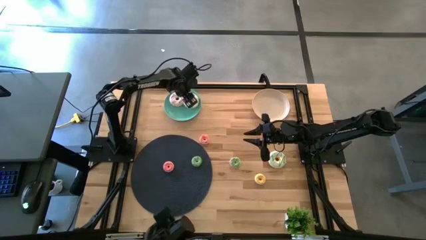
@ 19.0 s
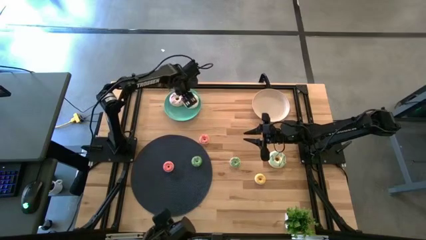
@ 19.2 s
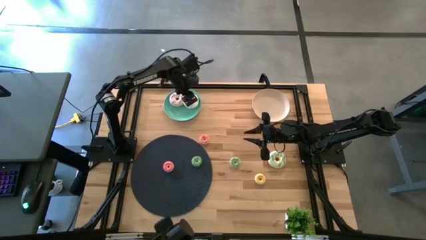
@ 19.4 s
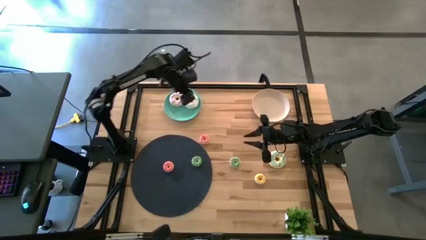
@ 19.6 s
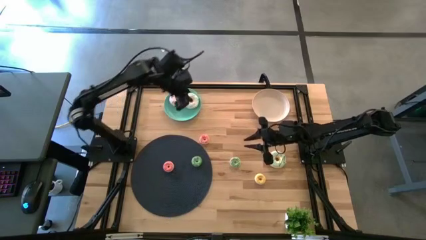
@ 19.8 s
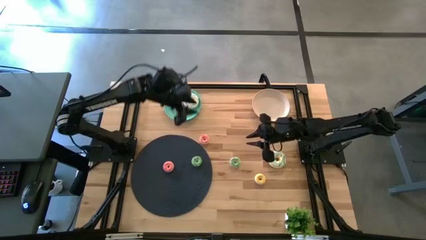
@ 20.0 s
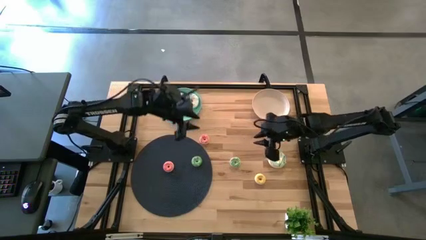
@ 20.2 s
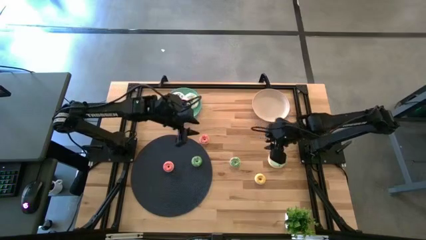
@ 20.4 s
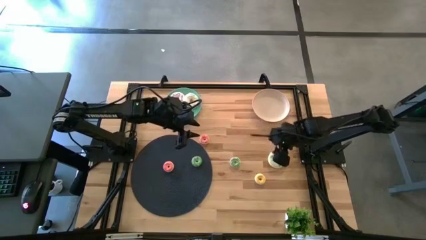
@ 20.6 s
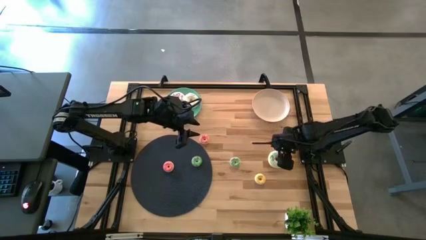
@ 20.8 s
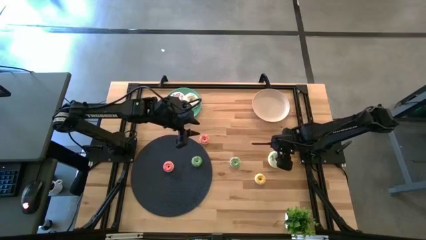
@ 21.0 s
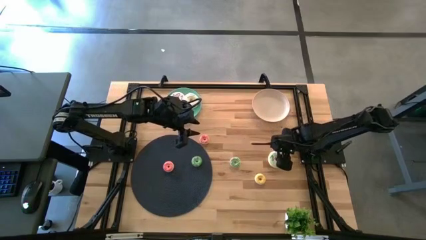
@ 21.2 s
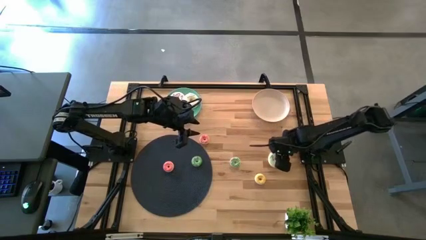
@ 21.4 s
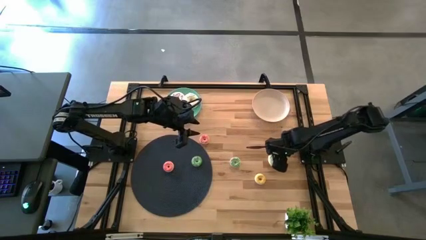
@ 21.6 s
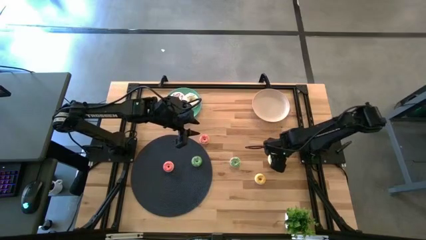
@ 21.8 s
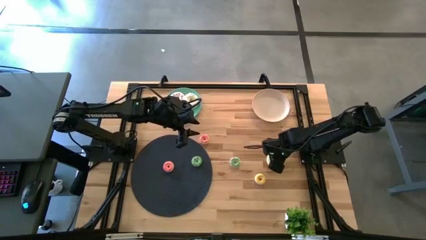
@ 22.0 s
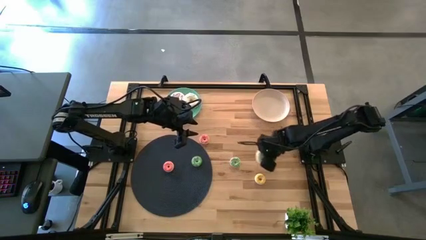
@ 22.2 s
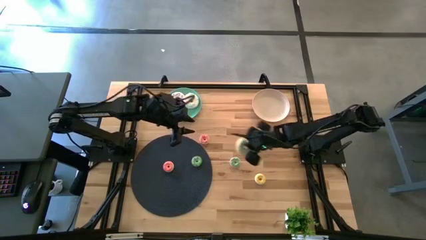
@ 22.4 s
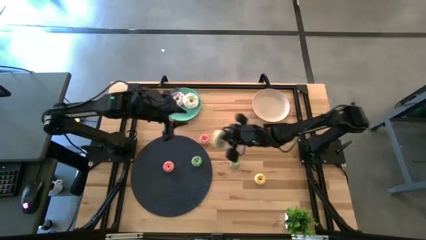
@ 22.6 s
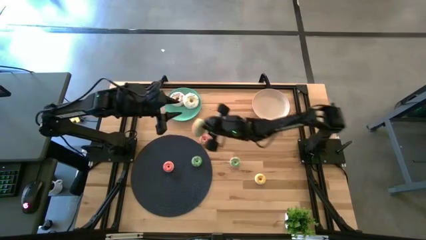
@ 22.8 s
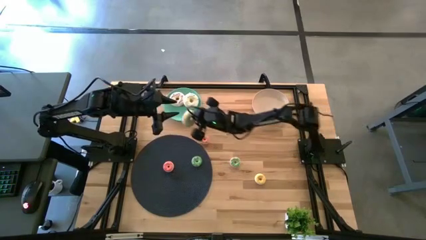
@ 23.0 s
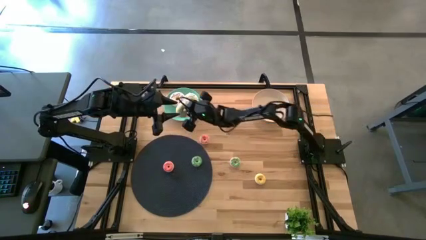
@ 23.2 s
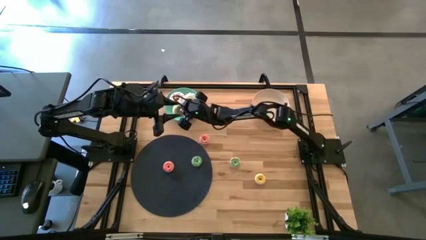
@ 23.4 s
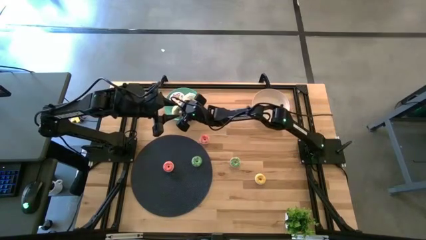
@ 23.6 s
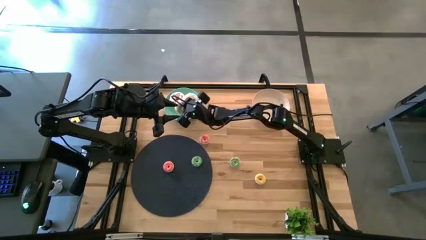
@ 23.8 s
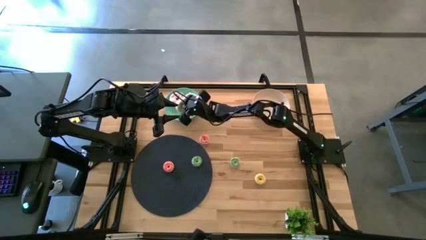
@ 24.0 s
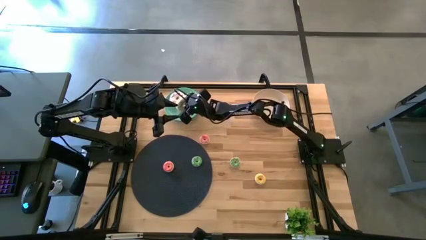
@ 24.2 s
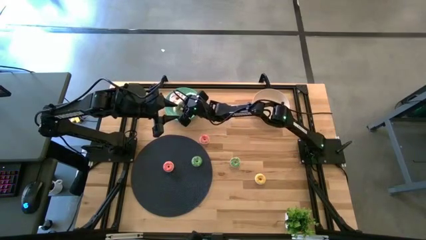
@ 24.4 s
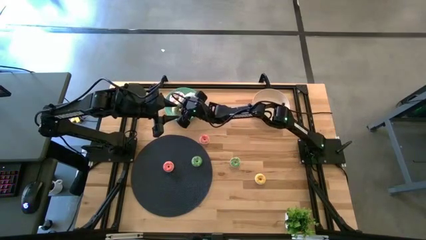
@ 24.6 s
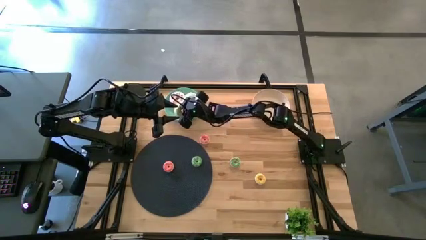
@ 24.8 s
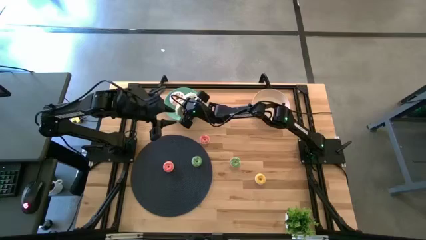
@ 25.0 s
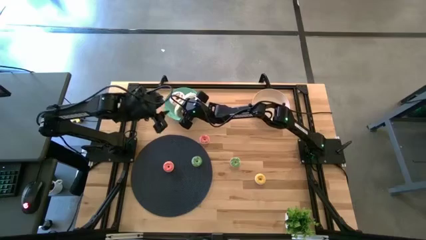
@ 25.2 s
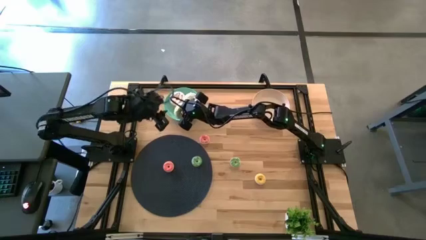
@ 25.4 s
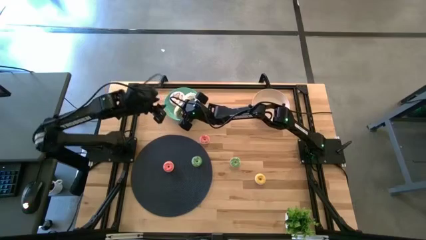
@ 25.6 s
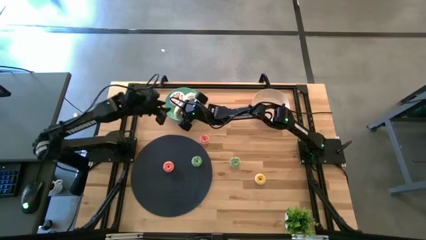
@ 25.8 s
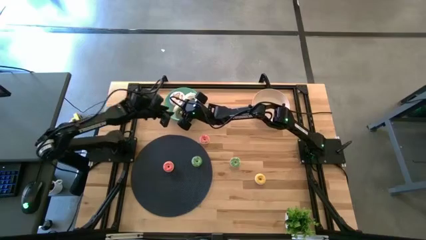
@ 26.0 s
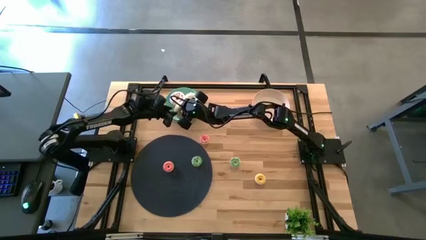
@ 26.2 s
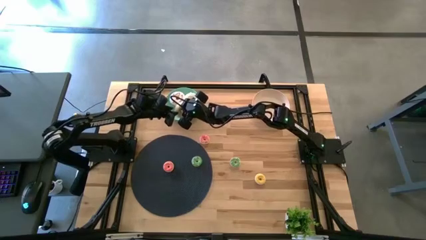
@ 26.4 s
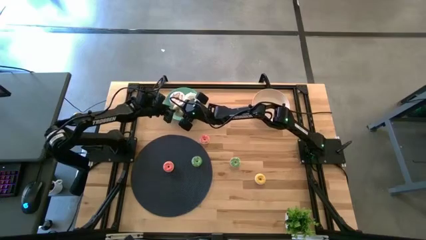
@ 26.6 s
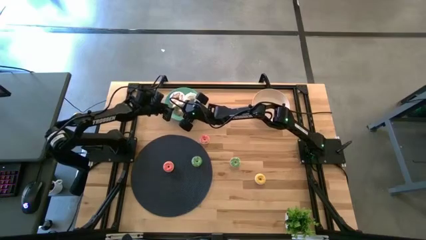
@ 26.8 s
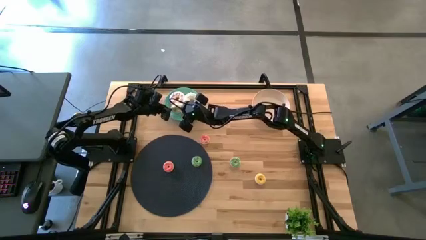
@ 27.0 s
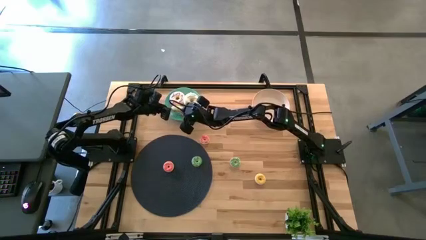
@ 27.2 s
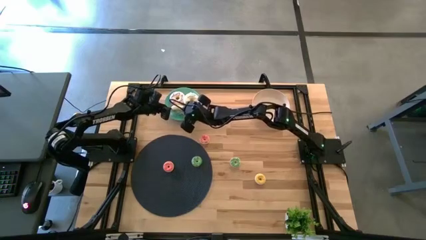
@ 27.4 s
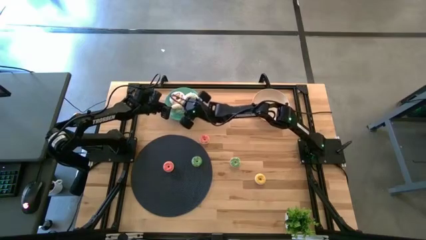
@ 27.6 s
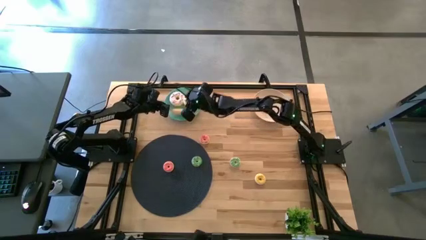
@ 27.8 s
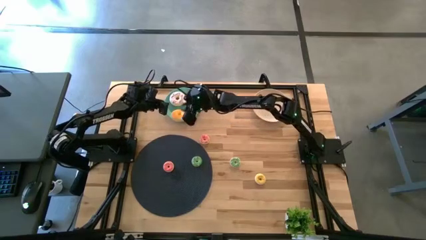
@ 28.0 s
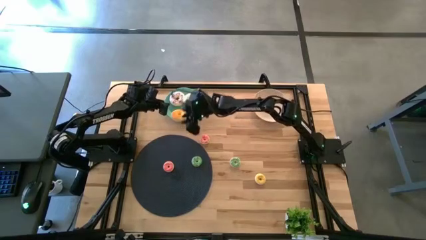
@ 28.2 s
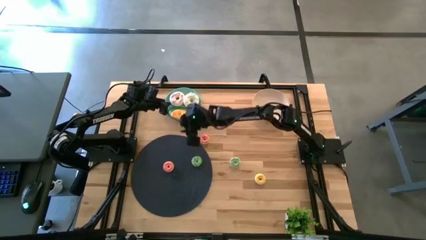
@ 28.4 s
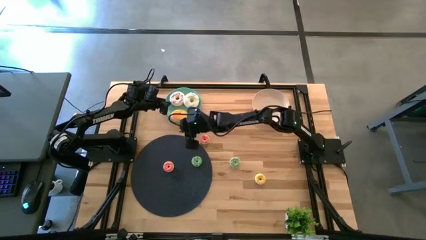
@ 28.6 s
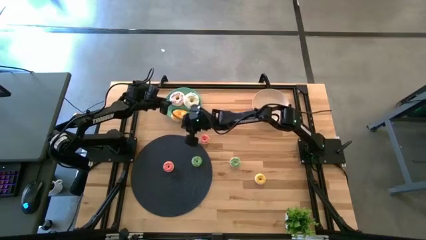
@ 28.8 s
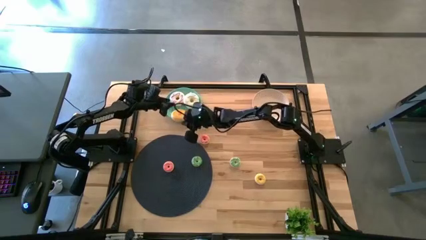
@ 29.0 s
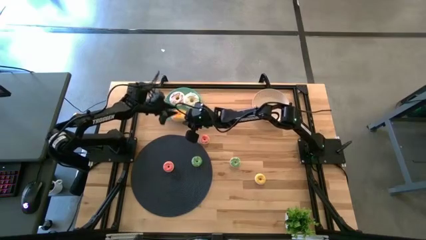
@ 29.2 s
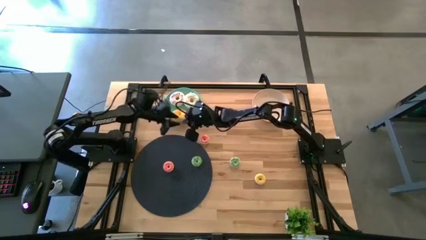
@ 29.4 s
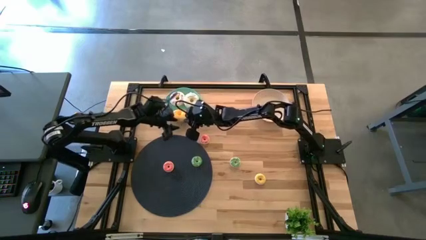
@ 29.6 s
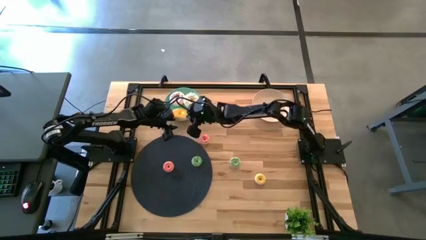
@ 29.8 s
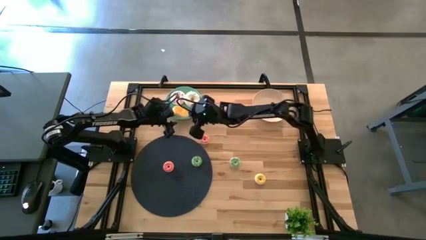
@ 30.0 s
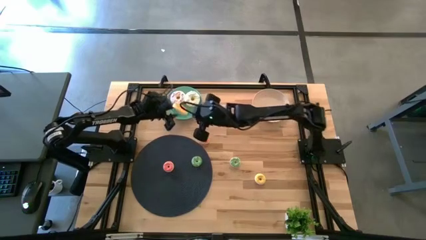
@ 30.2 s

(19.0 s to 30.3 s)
Task: Pick & Place donuts
Put the large blue donut on the green plate

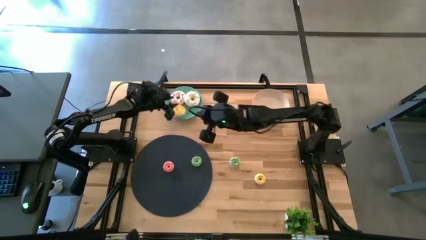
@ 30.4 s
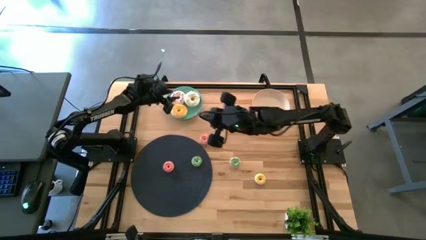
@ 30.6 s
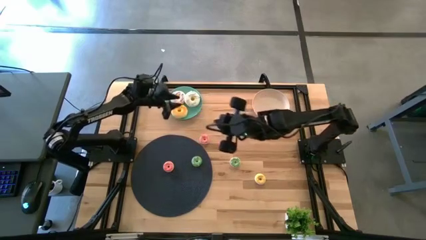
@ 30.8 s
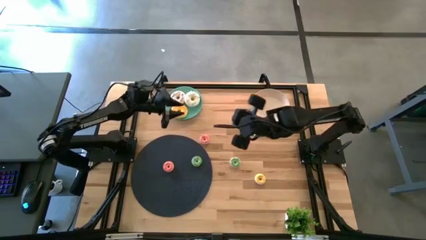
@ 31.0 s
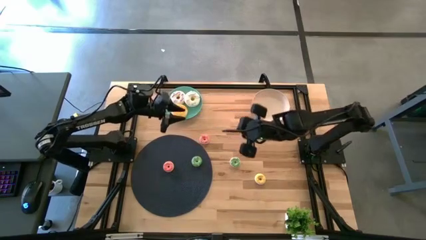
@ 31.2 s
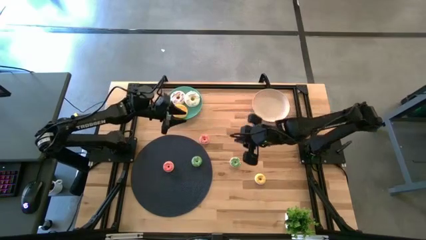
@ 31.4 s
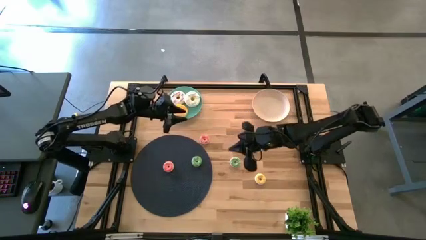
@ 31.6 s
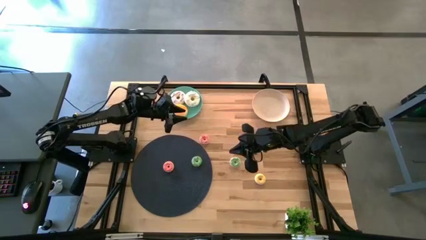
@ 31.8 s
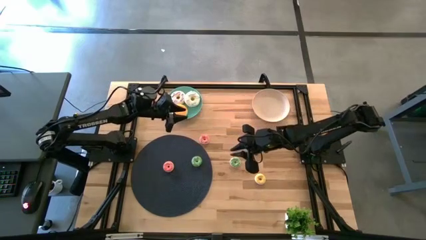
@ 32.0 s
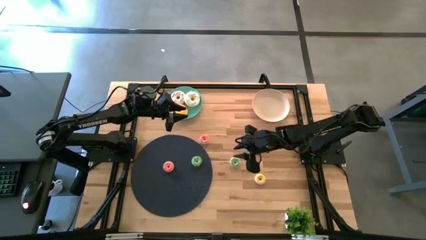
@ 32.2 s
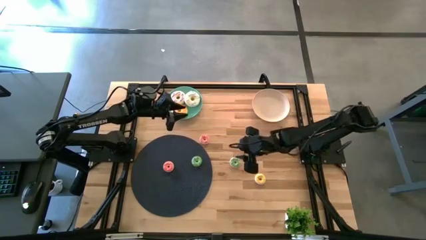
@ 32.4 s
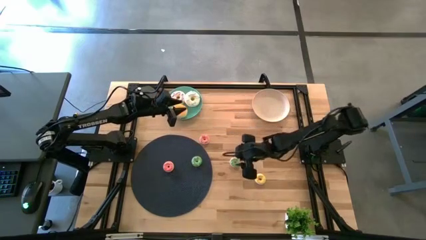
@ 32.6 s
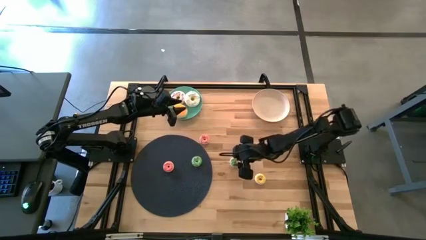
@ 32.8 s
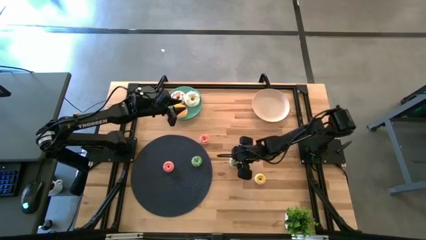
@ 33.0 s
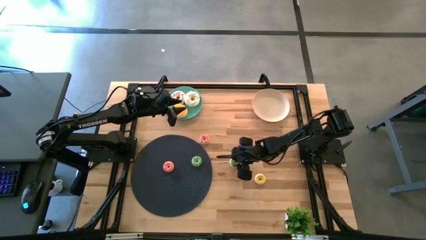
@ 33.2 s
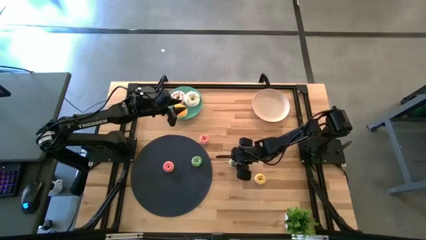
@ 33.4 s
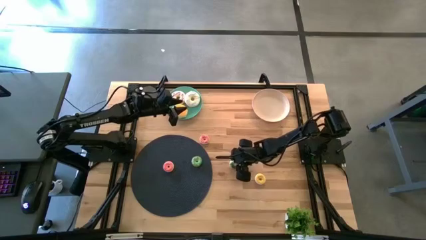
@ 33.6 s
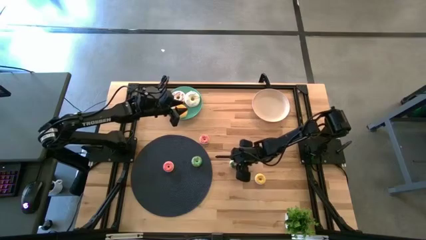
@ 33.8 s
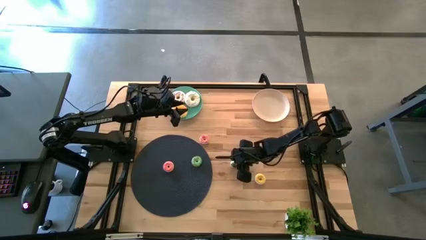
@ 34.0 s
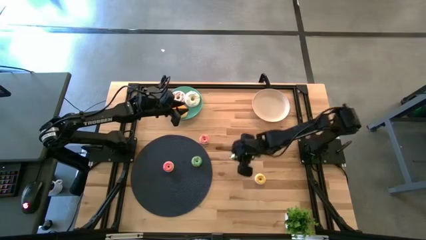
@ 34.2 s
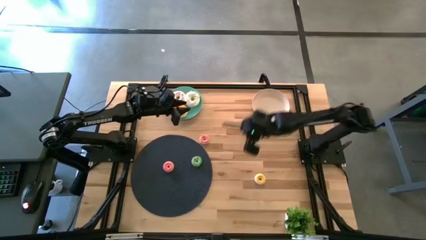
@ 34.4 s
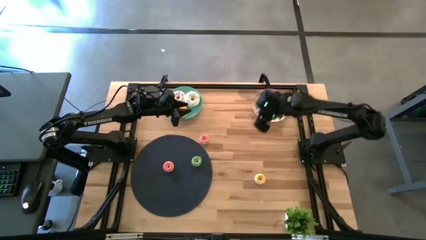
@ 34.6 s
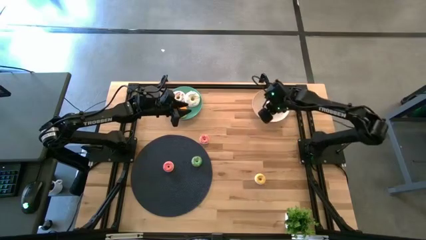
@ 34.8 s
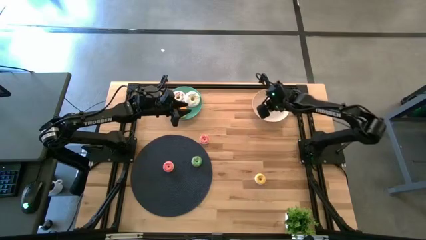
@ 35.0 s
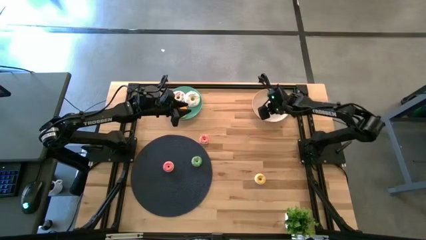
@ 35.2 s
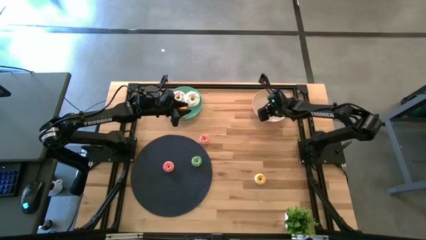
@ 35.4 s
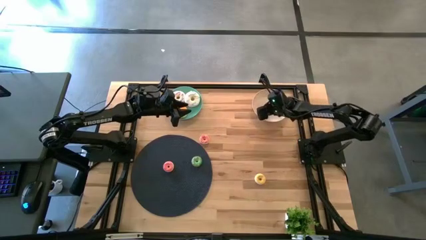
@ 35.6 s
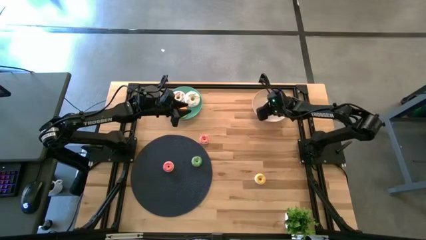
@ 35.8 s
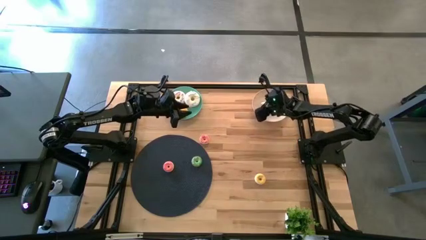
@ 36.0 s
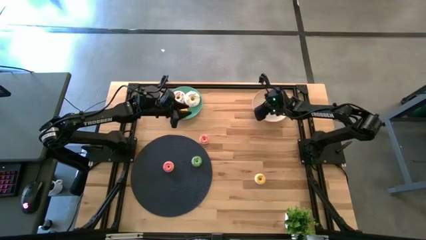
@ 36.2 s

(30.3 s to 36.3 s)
Put the right small green donut on the white plate
